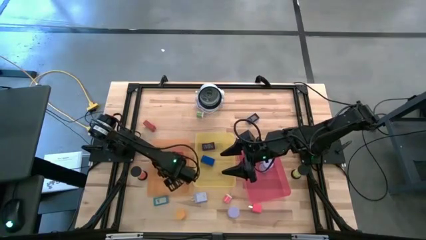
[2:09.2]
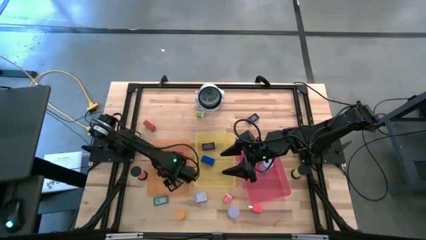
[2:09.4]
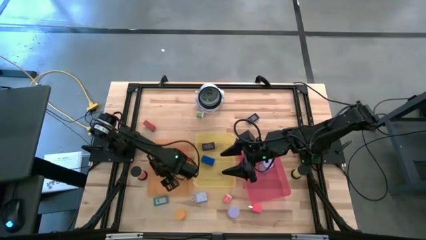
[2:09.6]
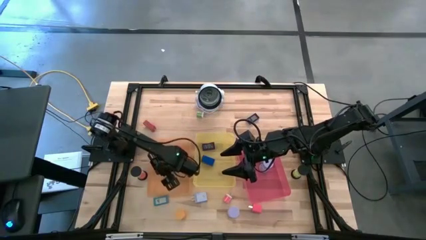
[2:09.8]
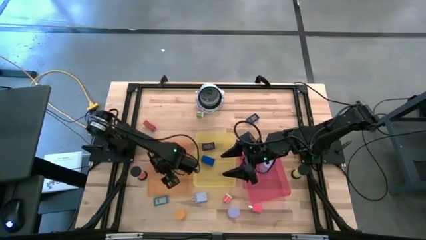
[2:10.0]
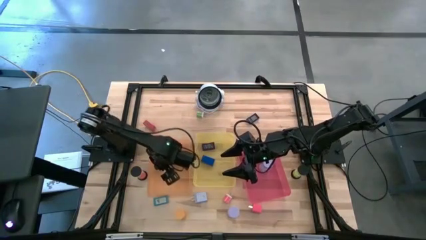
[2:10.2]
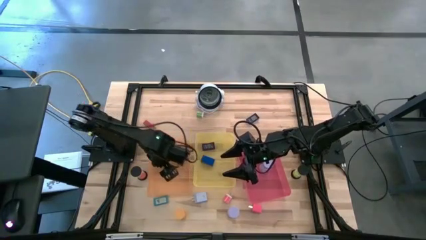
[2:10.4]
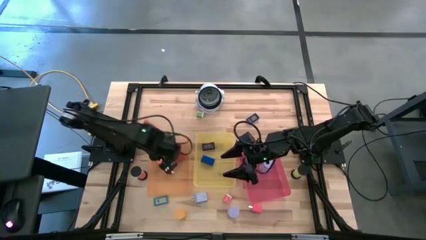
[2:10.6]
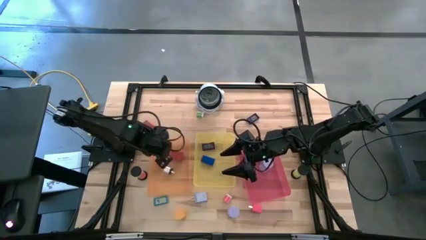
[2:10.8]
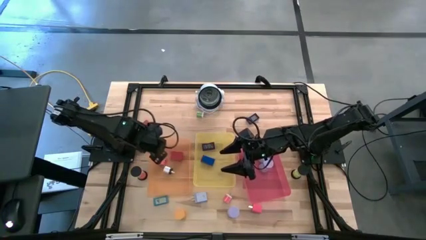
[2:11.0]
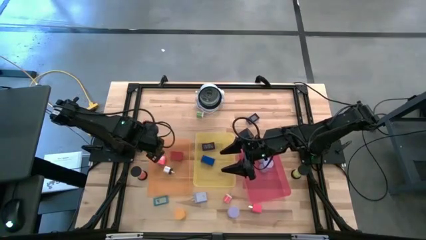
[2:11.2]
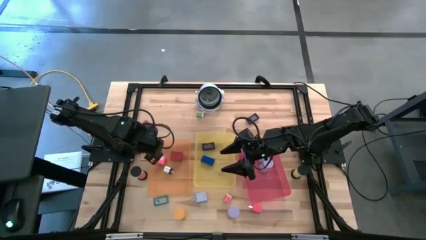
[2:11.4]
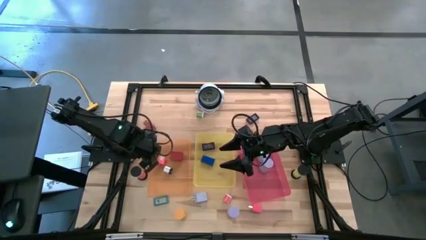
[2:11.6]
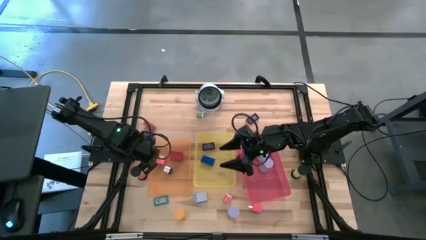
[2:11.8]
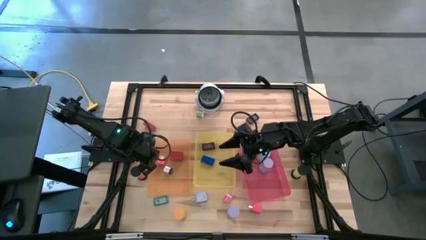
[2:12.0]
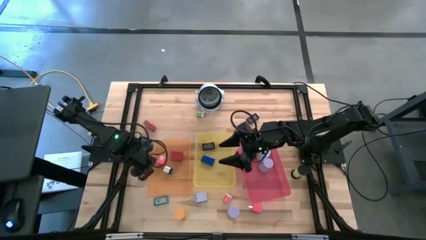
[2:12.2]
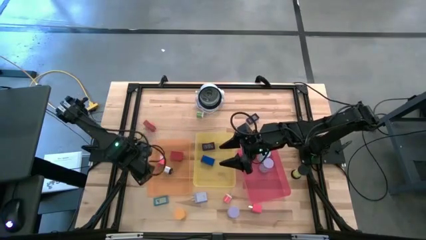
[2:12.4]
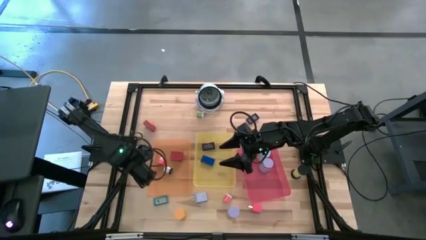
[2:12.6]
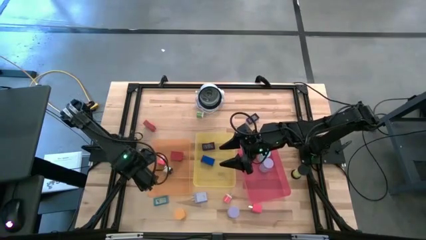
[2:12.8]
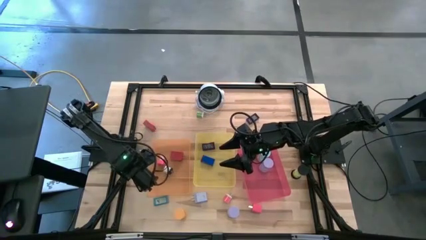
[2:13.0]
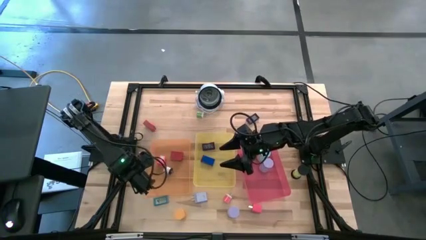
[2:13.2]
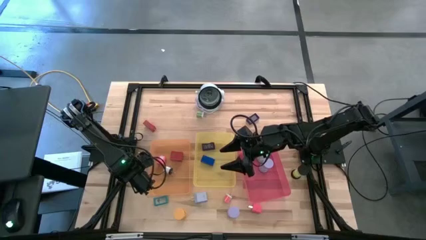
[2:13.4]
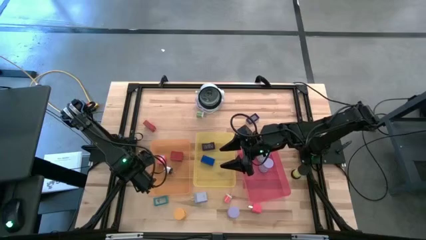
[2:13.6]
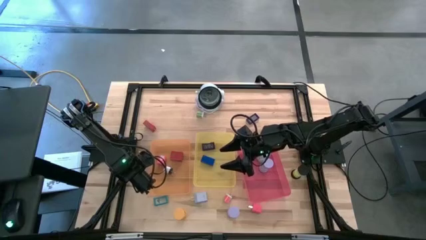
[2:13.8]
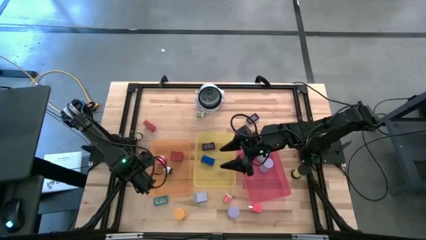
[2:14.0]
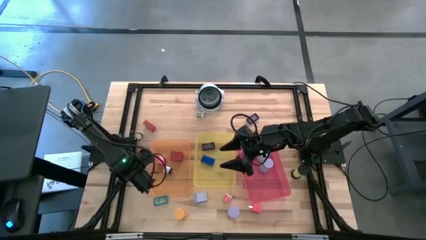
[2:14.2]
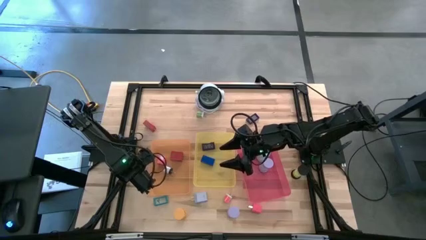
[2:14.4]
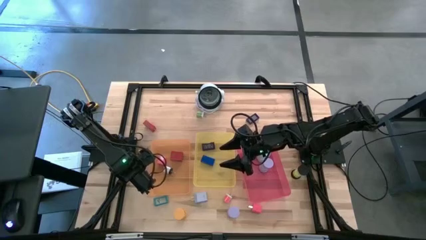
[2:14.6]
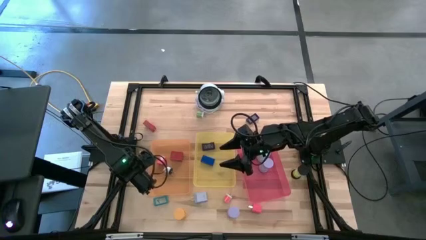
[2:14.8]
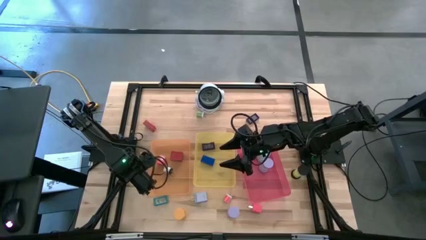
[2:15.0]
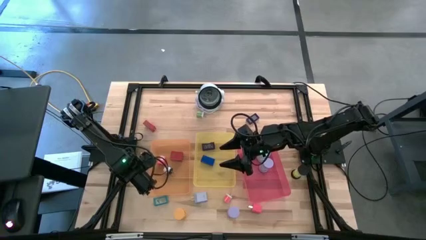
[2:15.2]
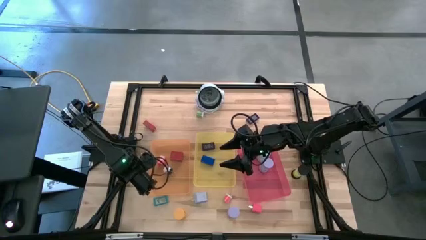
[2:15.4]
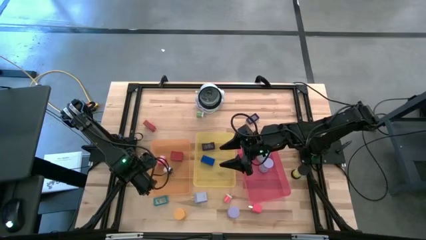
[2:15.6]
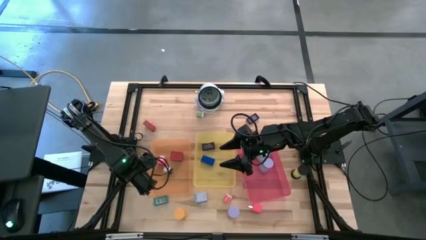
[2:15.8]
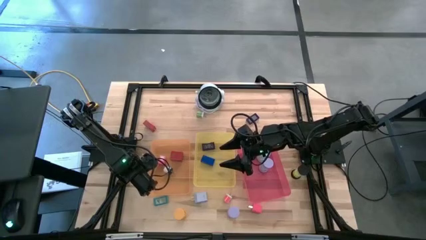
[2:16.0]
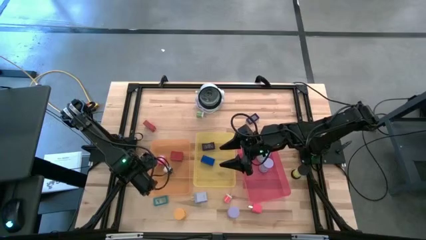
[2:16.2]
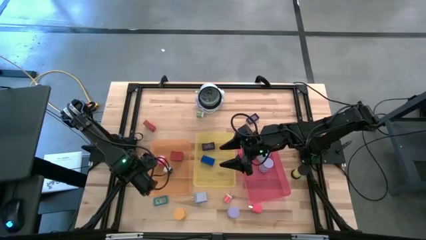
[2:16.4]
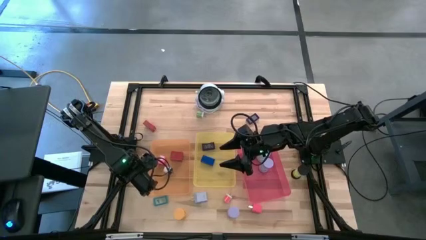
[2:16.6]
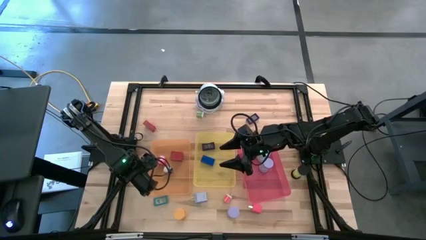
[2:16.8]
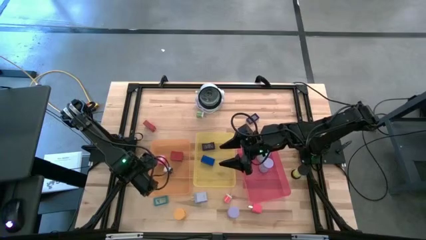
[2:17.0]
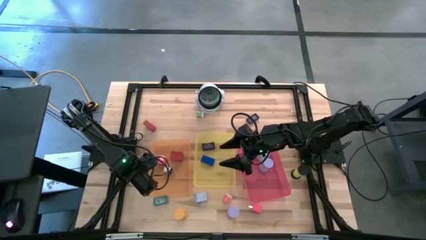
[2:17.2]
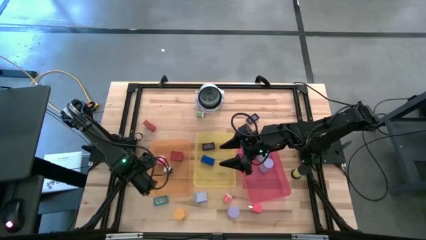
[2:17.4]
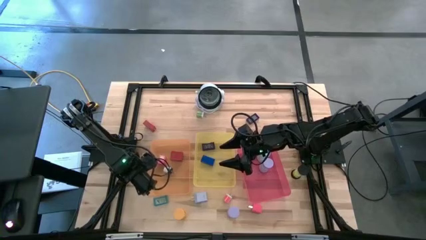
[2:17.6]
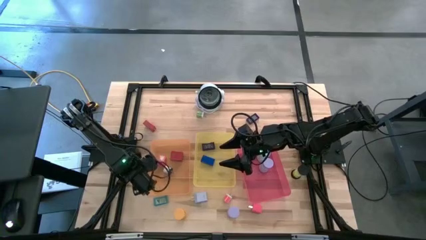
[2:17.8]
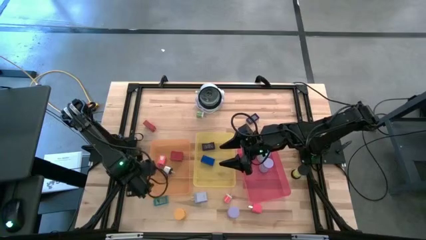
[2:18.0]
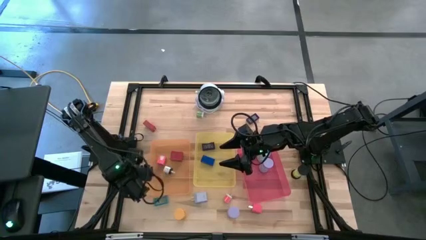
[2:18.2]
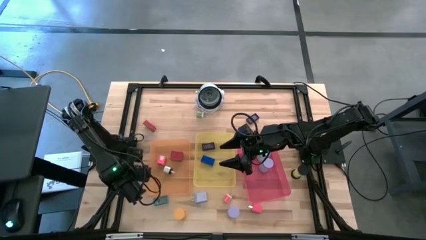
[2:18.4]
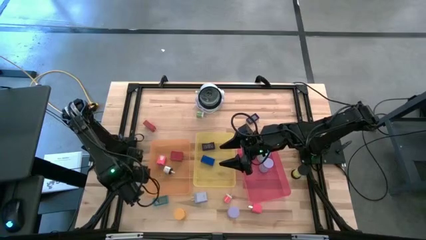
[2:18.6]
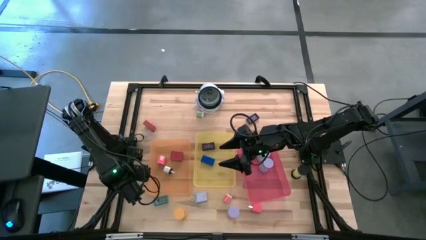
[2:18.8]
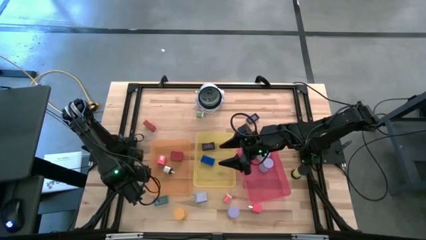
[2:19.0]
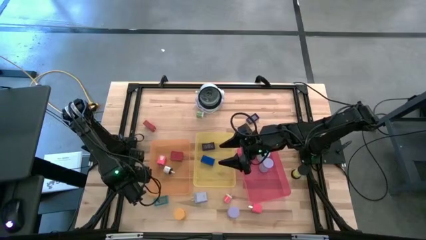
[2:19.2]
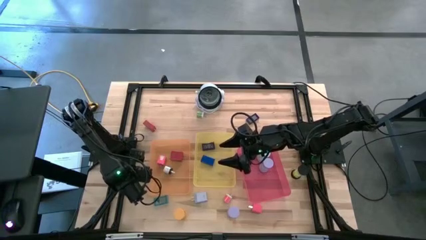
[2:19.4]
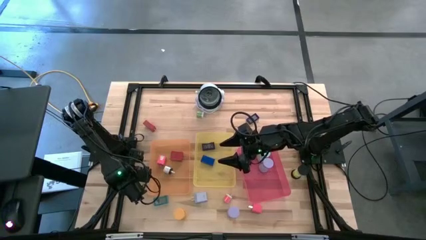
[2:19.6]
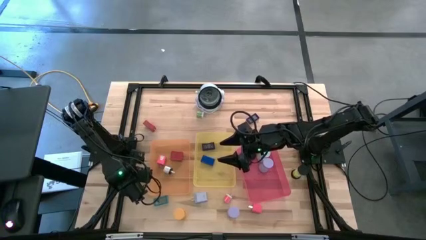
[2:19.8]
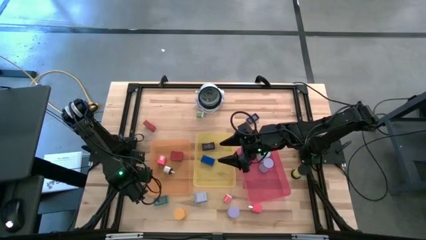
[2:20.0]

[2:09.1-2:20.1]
Task: Pick & Place Office items
Put the black hourglass timer into the red bin
